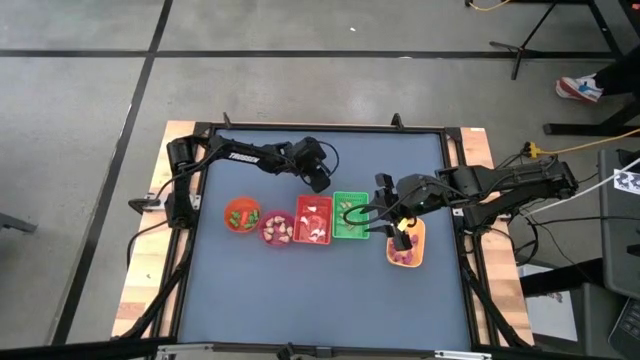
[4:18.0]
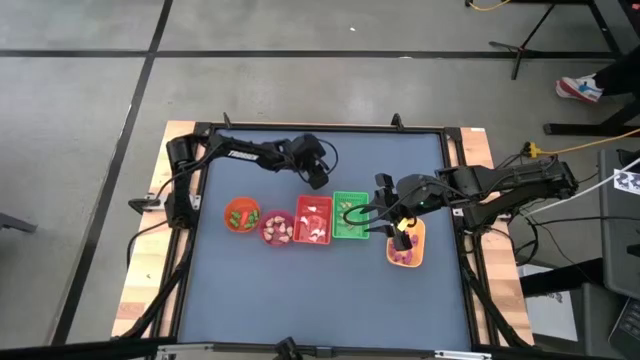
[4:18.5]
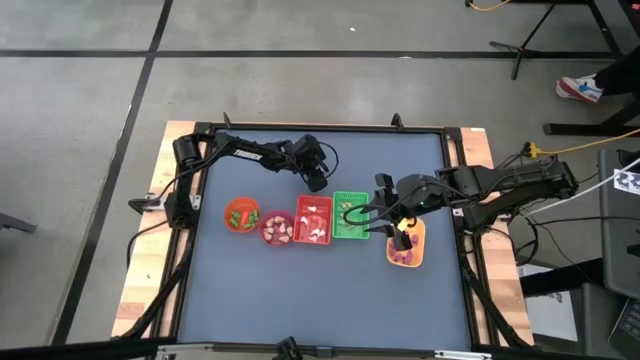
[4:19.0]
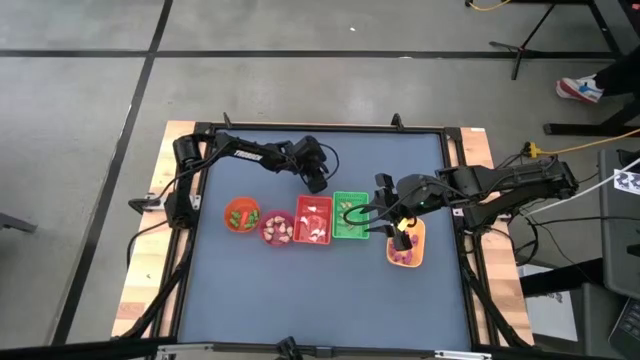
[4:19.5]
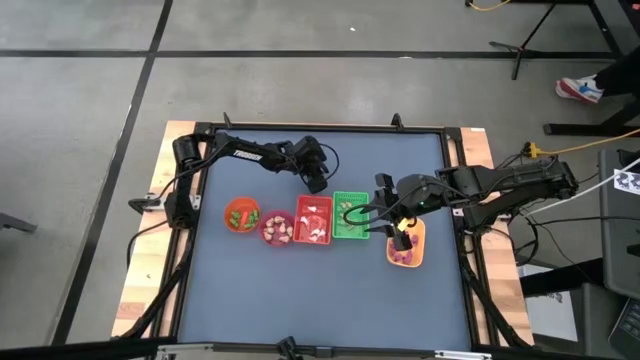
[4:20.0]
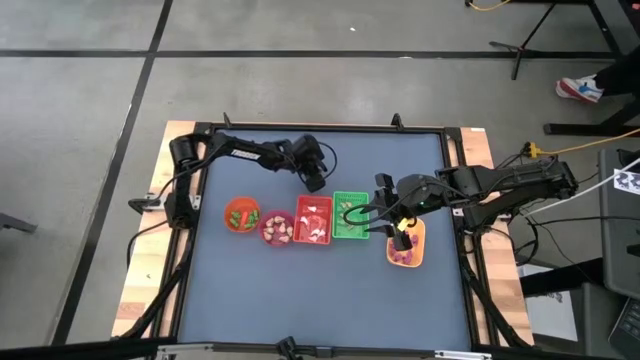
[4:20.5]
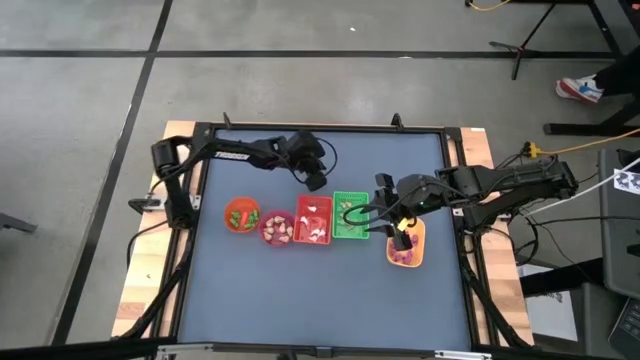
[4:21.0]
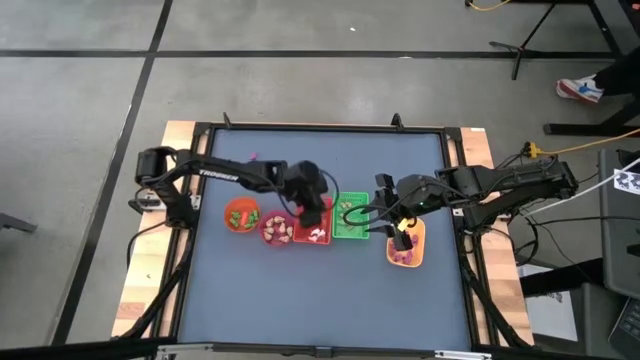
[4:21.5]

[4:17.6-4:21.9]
Task: Sort Halloween decoration
Put the white ghost toy into the red bin

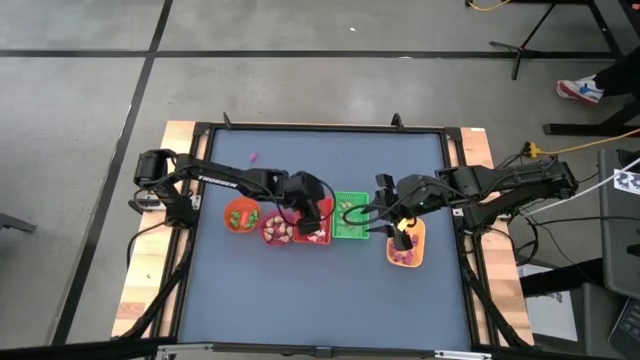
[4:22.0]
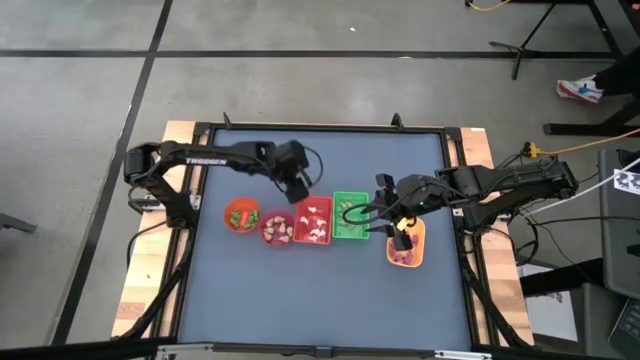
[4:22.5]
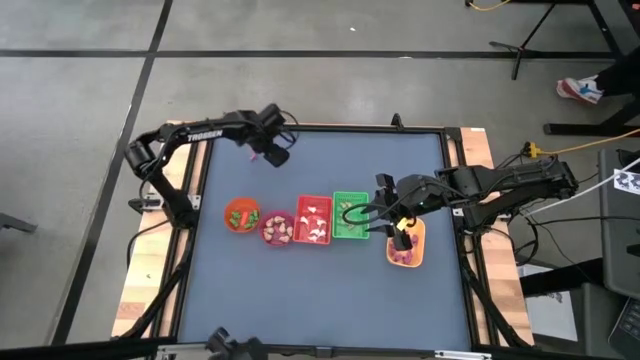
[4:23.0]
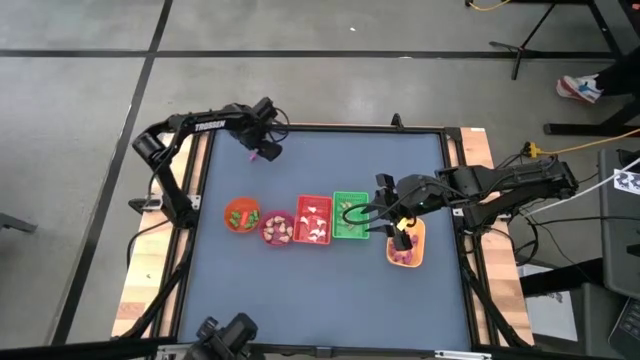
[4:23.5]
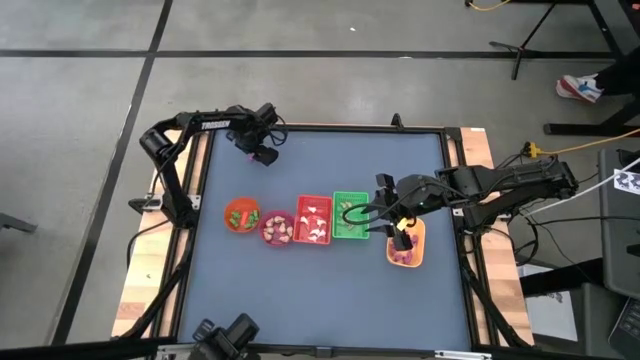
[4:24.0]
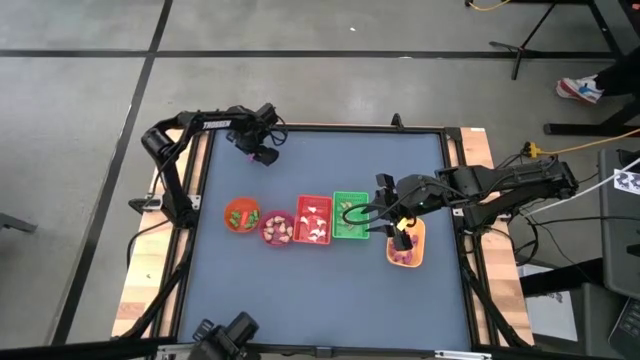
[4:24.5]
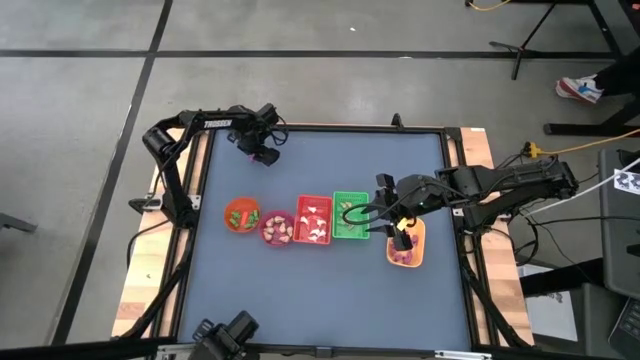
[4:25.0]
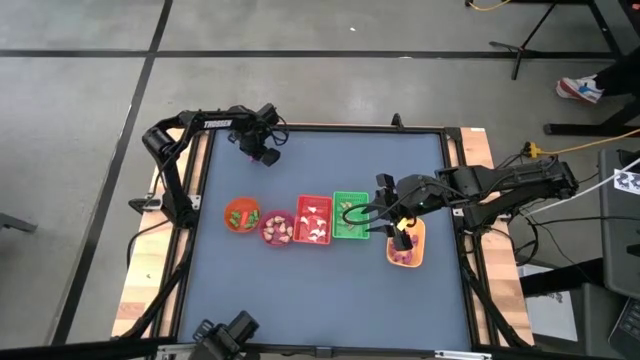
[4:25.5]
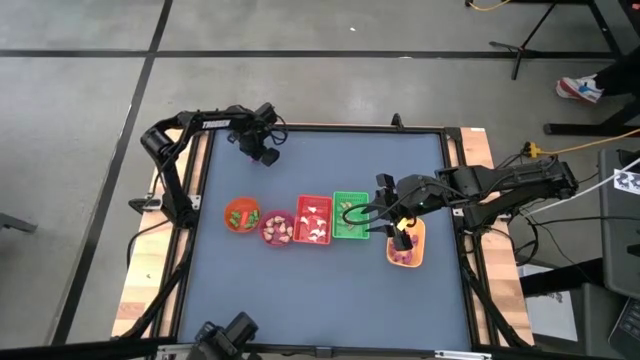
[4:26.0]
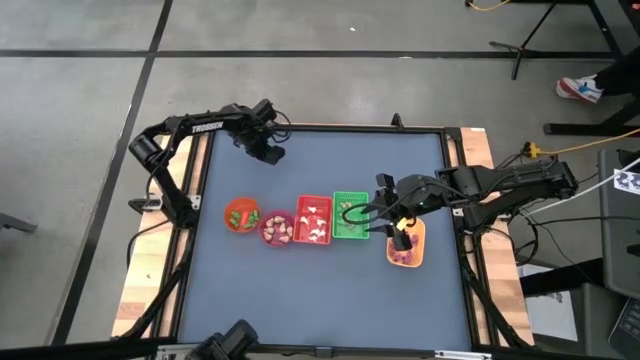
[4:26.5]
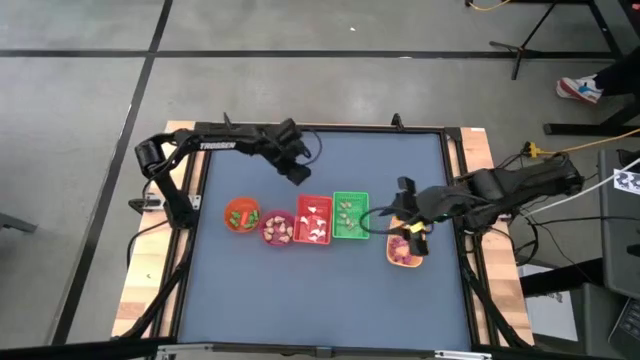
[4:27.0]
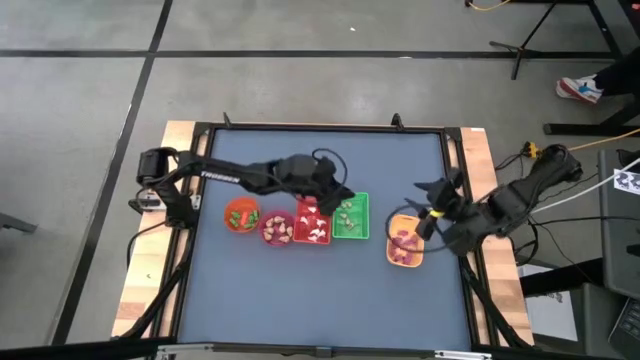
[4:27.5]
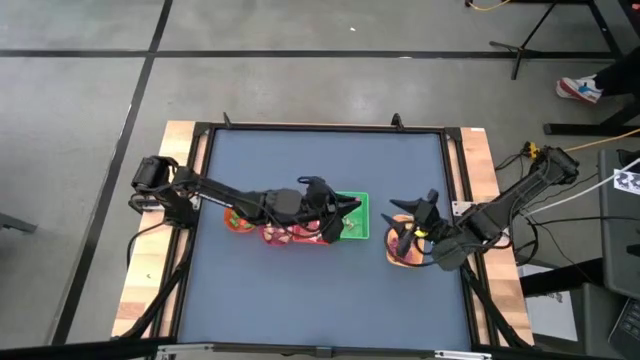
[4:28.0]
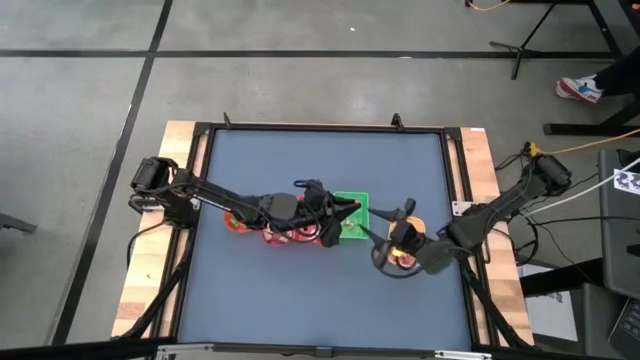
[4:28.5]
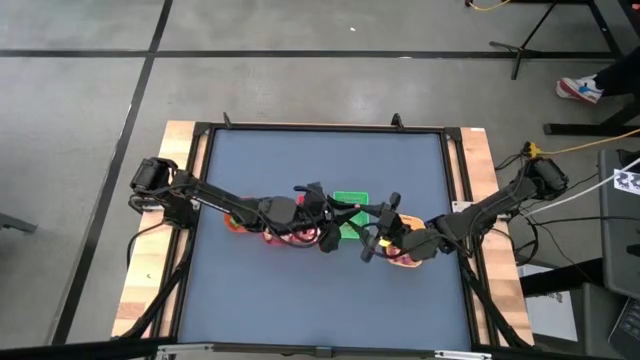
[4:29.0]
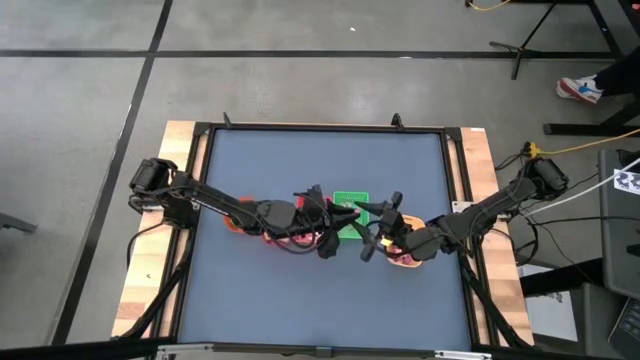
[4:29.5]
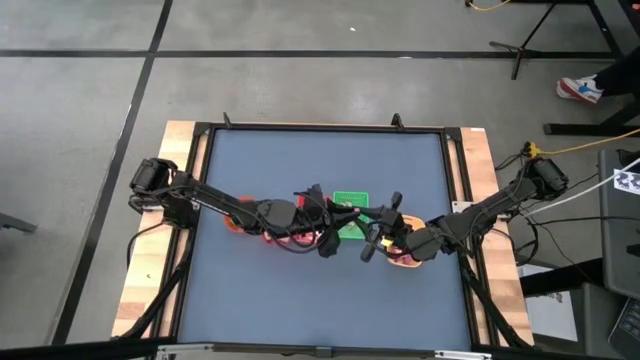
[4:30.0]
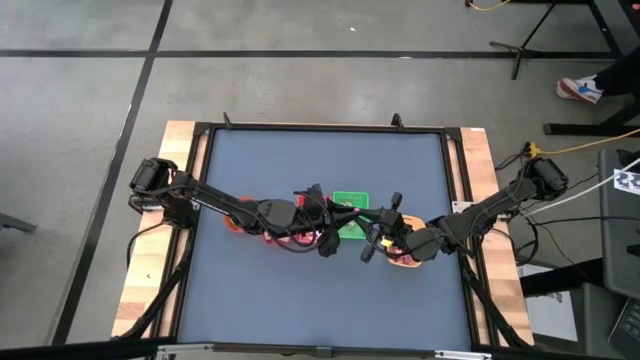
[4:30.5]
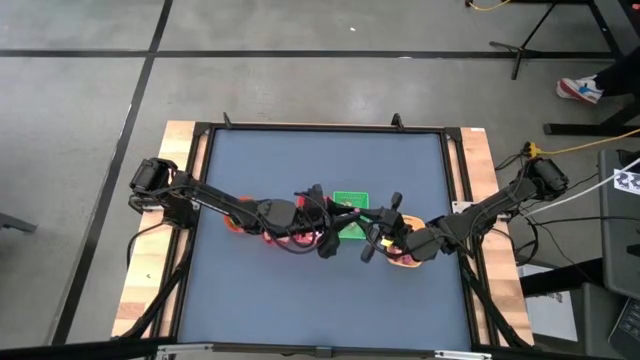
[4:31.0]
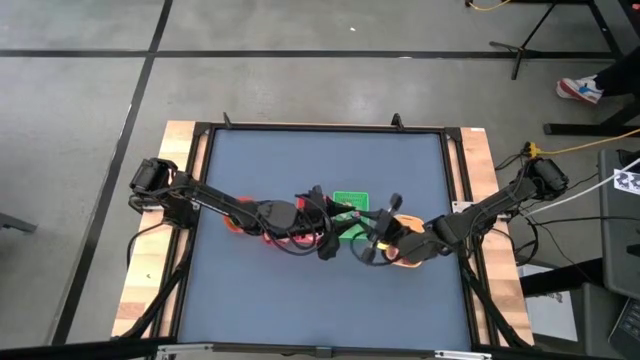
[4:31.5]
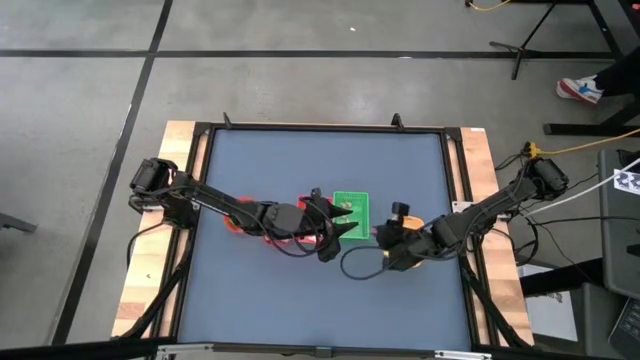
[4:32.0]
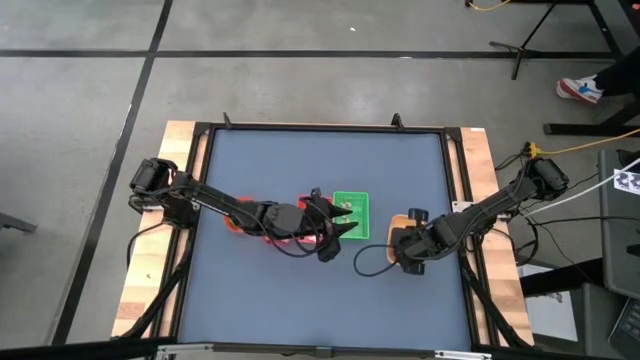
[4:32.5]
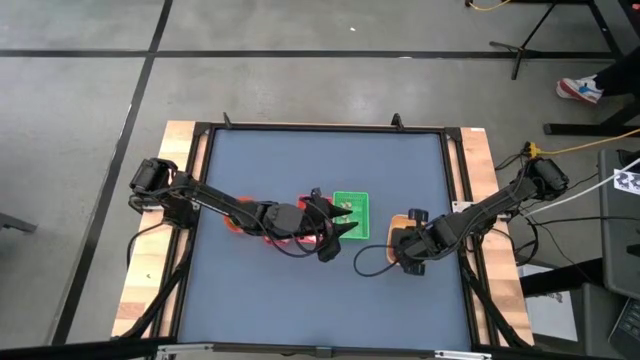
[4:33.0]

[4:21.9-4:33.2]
Put the pink skeleton toy into the yellow bin
